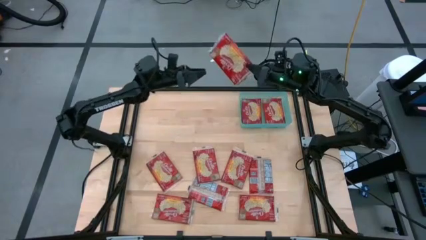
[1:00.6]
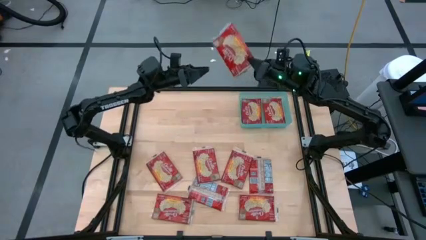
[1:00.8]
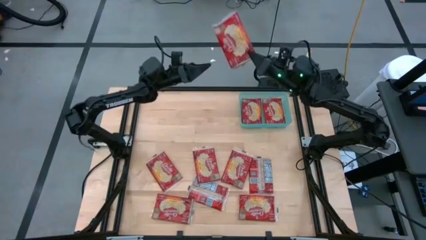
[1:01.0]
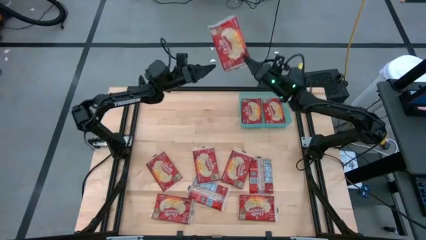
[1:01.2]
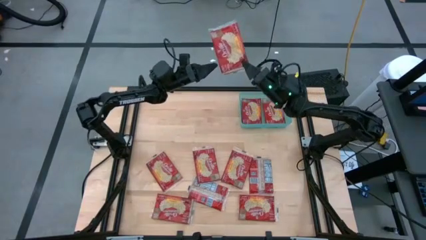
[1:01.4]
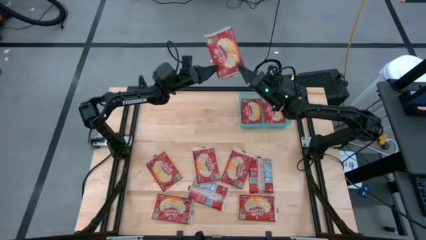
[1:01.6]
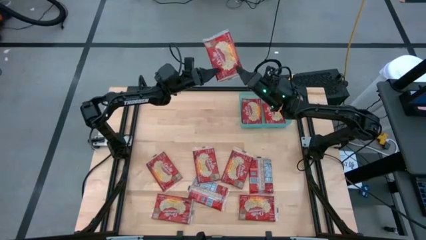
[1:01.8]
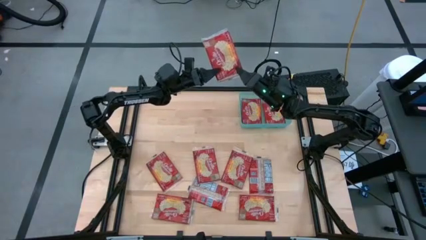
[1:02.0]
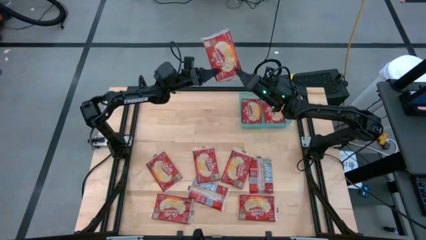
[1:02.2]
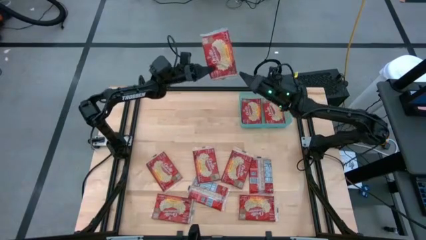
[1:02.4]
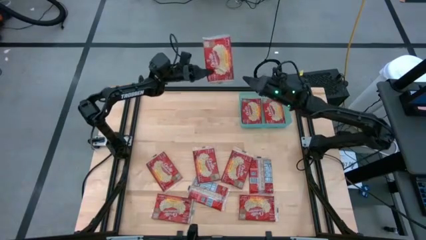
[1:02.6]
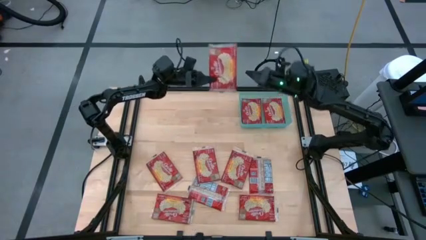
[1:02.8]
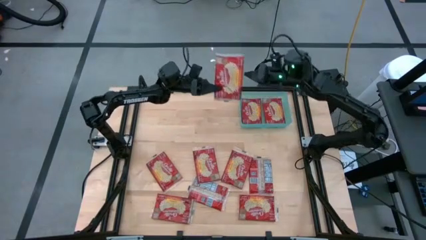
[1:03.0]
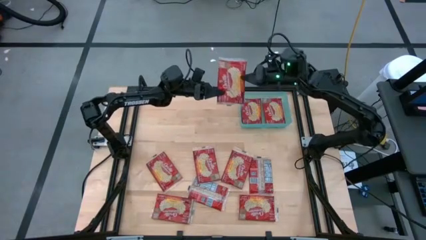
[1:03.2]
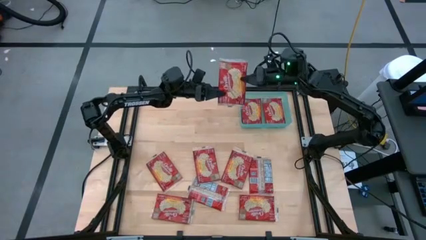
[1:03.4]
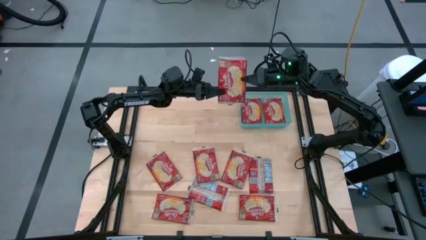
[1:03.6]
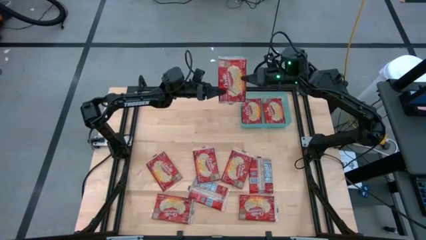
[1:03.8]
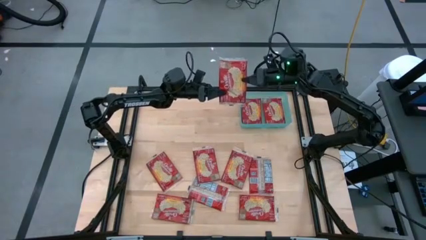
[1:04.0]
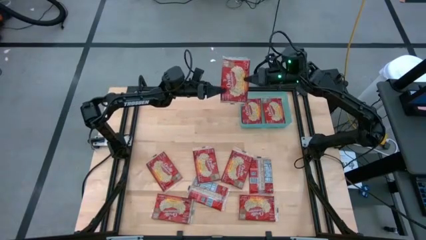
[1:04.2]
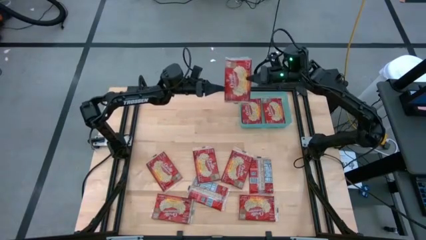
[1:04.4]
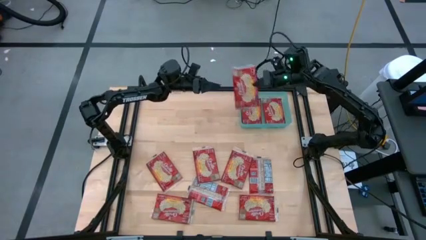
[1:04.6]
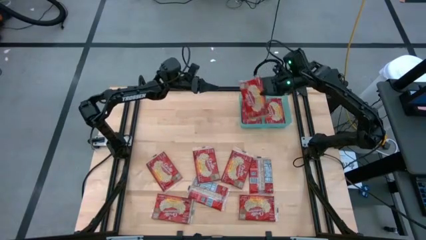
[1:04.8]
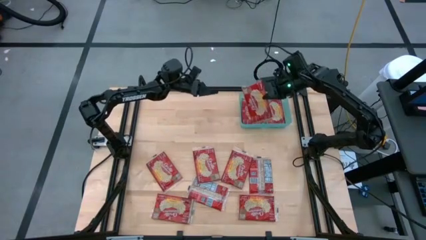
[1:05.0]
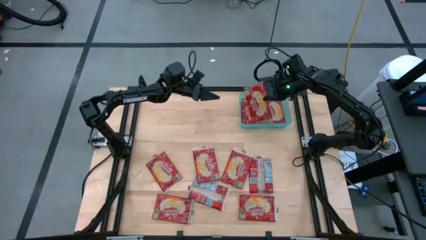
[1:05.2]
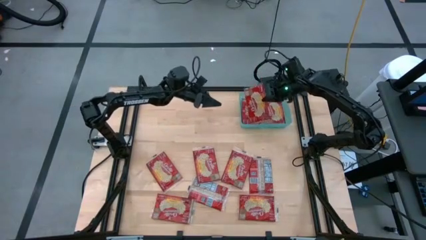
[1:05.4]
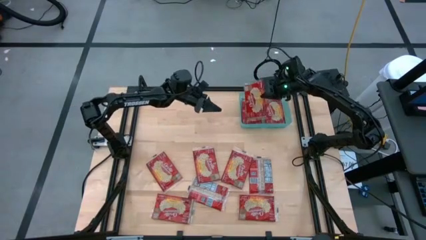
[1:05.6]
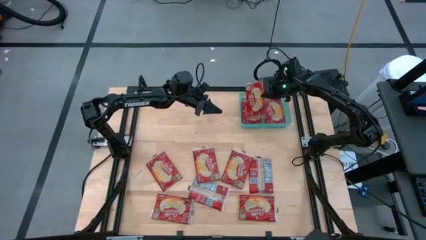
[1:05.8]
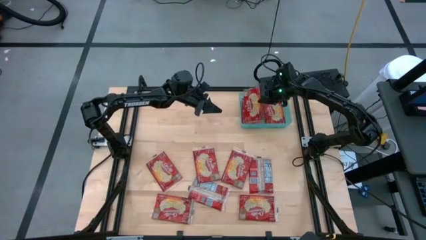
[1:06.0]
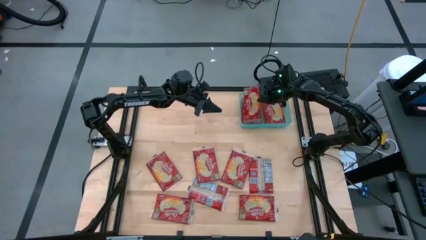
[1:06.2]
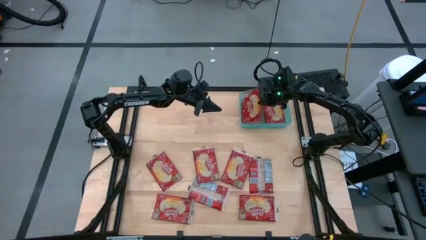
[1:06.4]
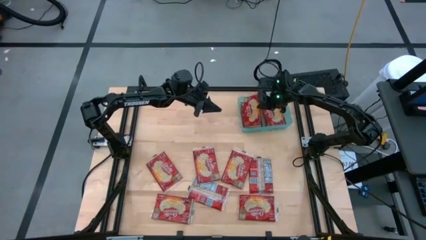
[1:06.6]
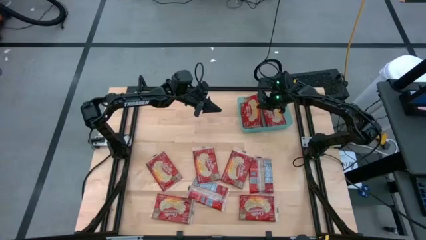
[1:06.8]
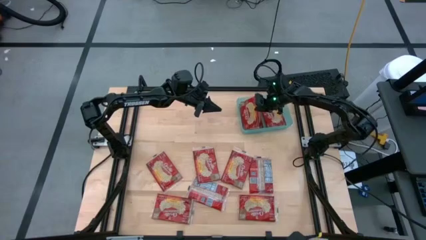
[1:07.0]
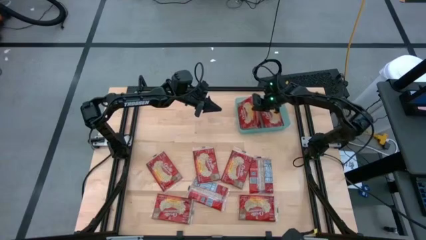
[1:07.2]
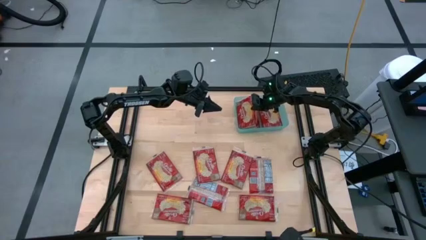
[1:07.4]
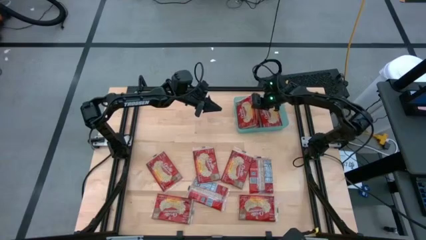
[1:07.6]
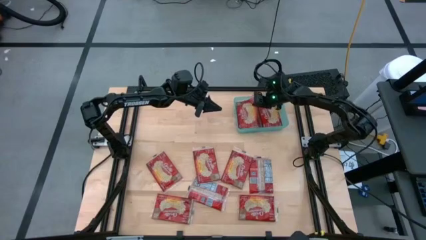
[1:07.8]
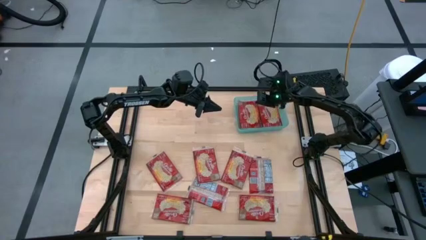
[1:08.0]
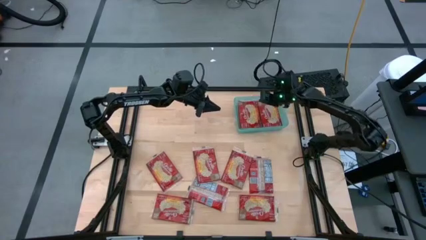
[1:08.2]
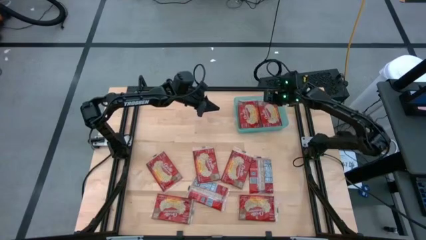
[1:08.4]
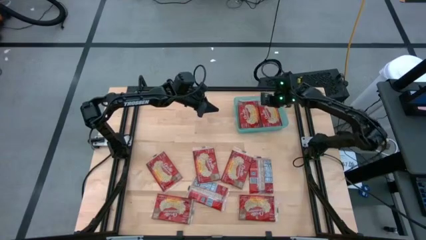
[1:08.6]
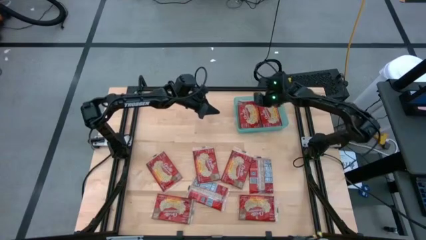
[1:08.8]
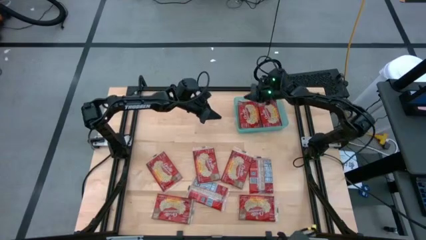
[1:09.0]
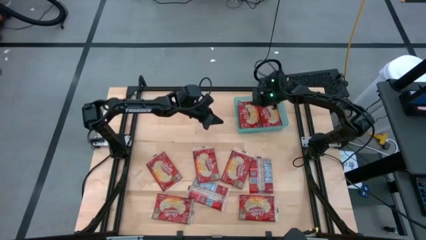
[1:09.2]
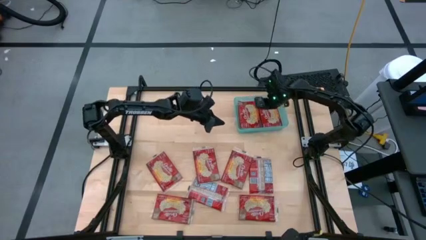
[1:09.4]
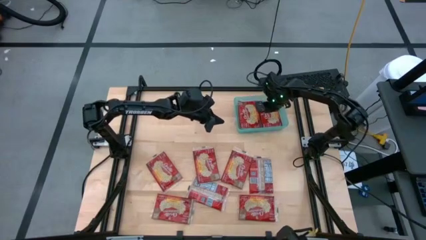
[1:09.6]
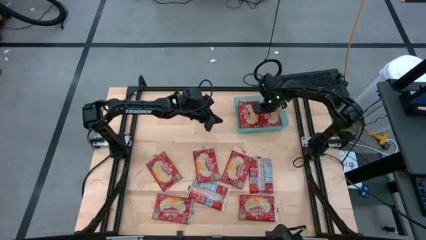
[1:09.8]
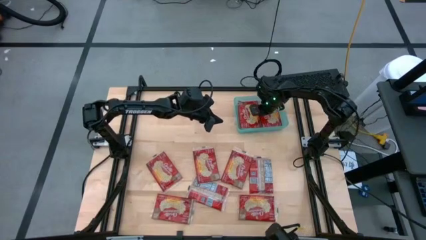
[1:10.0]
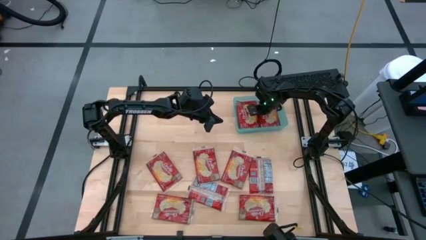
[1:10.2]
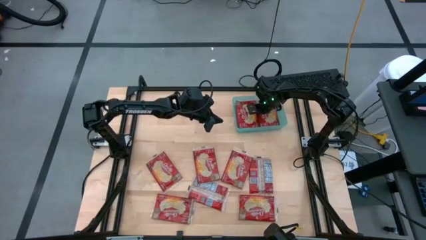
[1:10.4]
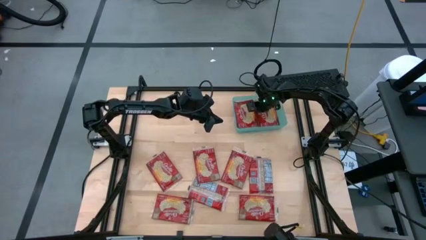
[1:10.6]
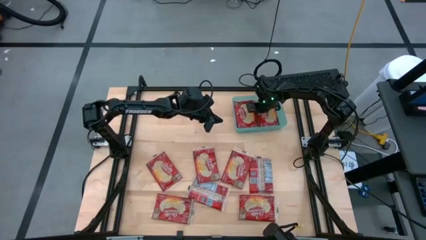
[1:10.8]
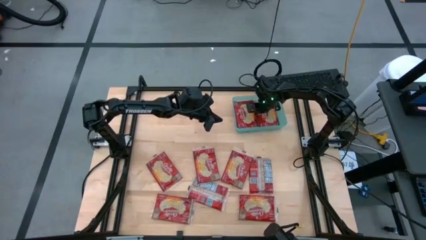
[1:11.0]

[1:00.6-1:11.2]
Task: Sort popcorn bags into baskets
Put the red popcorn bag into the light blue bin

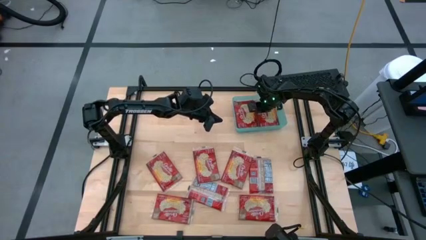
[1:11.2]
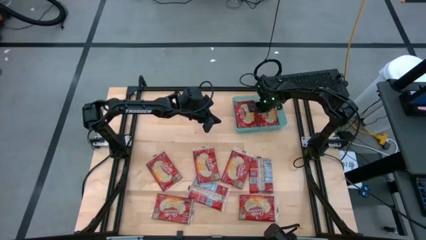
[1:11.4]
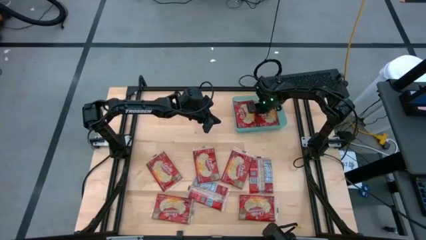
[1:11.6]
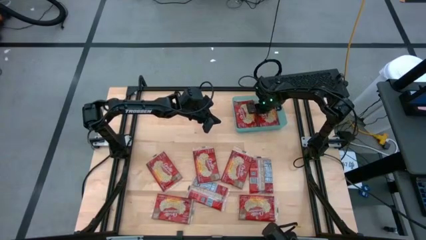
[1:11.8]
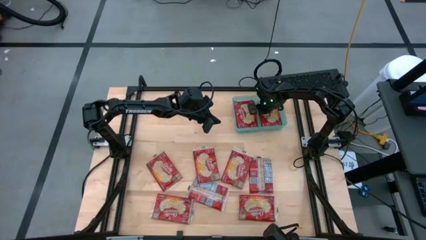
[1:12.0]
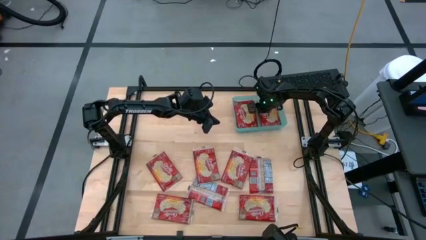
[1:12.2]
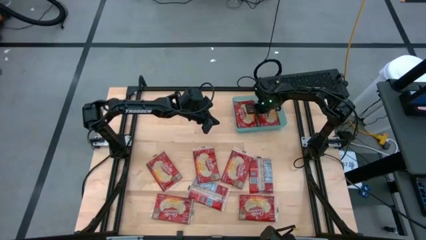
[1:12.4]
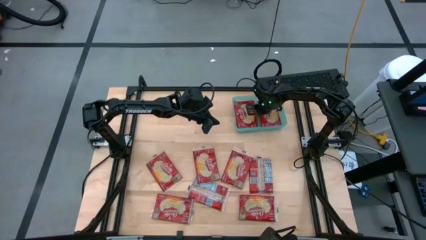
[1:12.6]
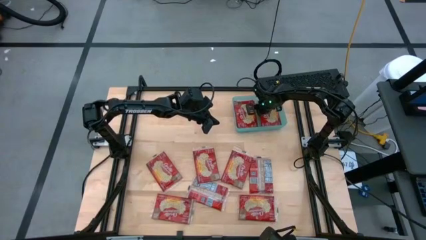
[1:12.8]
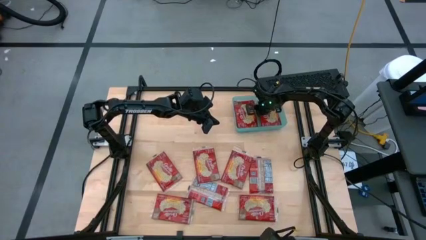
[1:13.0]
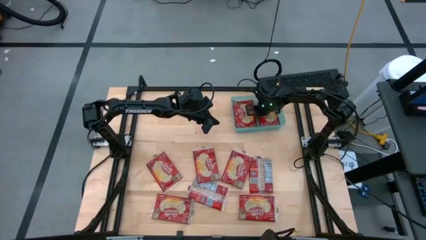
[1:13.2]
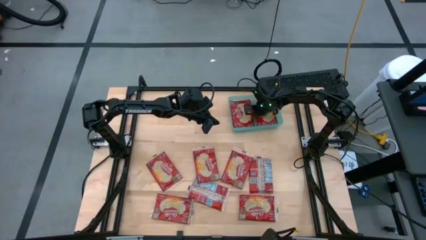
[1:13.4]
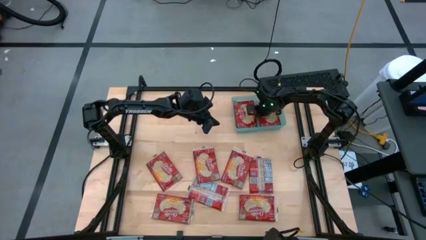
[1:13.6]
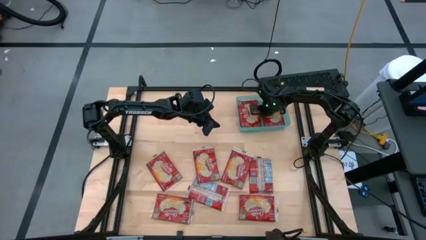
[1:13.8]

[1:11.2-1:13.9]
Adjust the red popcorn bag in the light blue bin

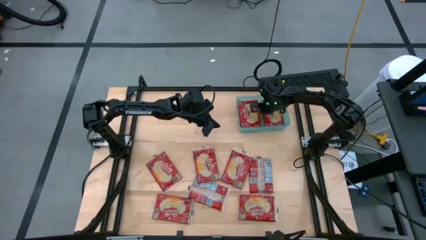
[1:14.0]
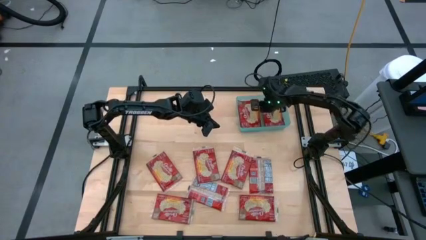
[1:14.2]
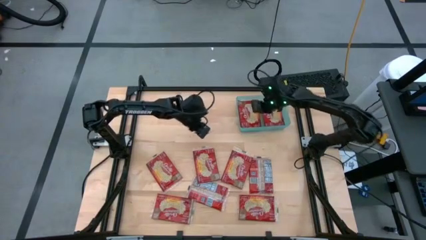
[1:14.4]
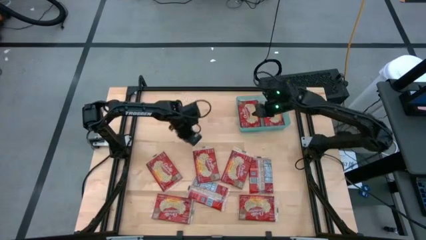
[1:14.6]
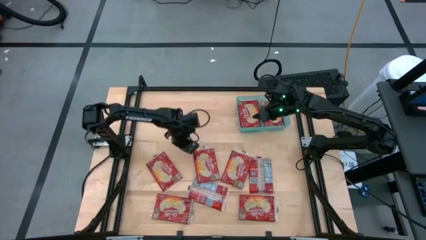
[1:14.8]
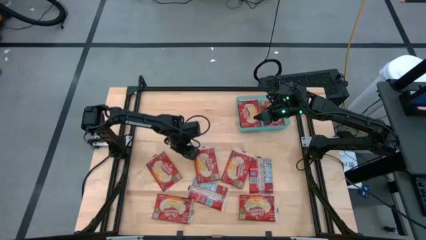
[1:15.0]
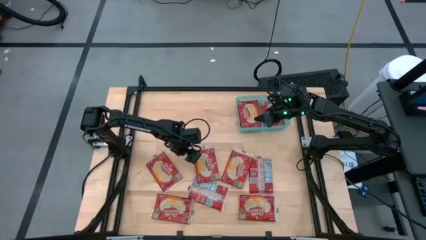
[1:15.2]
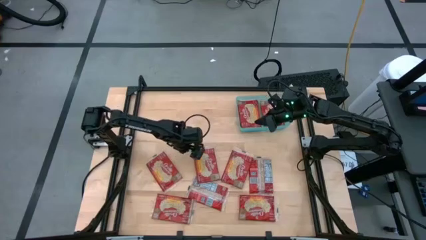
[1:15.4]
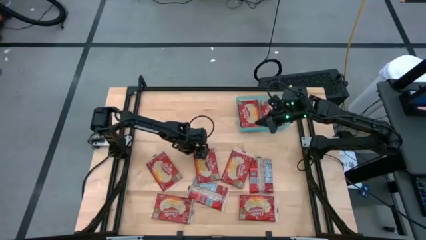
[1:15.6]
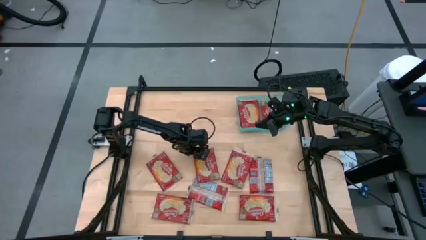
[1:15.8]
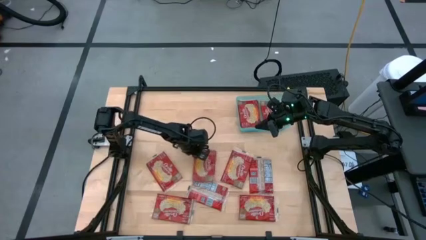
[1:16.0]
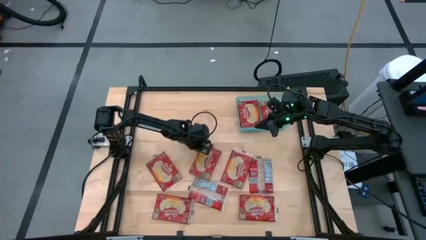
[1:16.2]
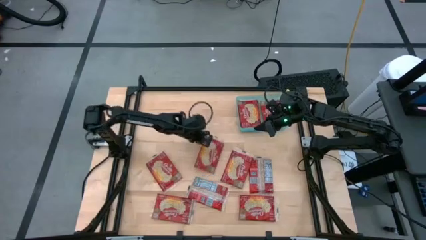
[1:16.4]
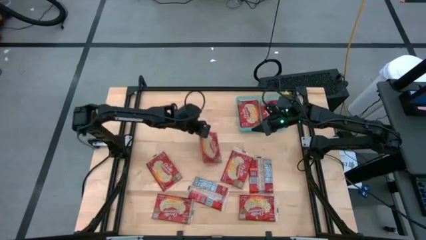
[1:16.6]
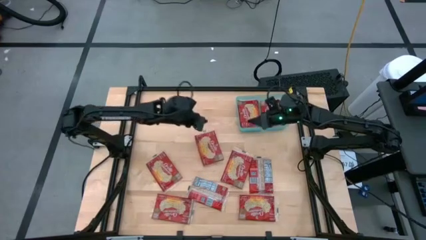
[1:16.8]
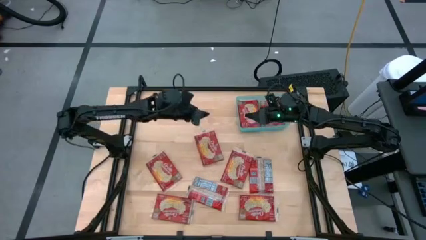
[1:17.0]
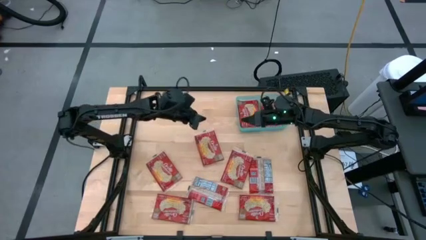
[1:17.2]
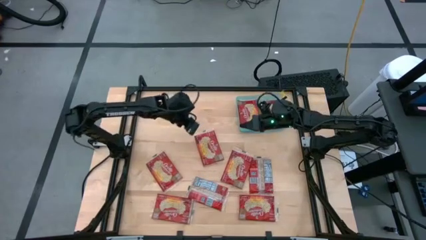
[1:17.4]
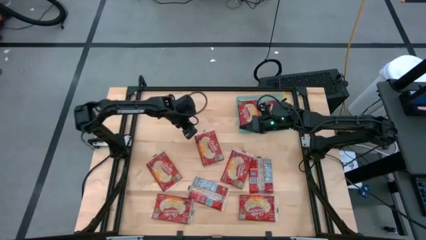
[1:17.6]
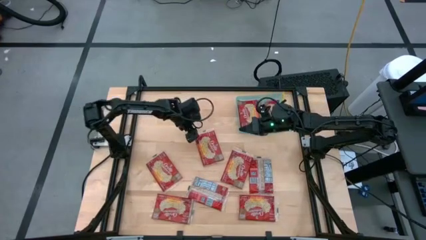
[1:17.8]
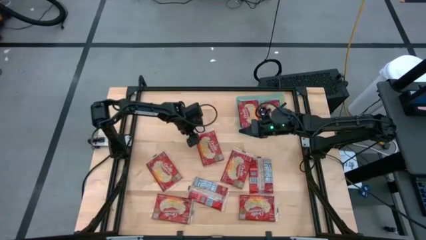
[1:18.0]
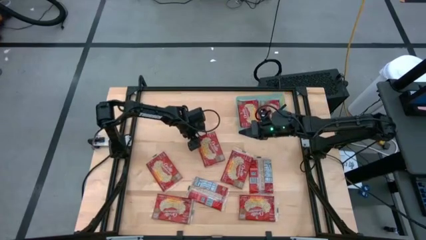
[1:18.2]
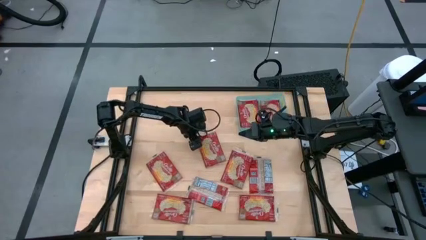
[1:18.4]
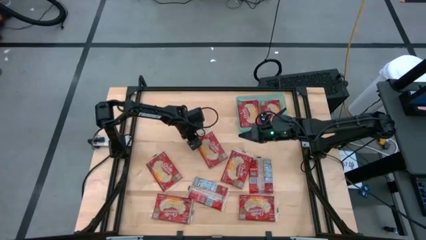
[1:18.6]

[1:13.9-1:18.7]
Put the red popcorn bag into the light blue bin
